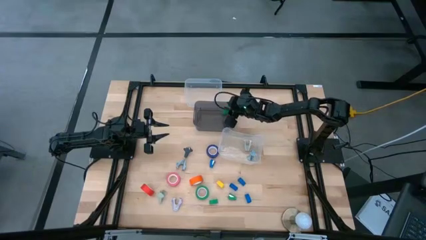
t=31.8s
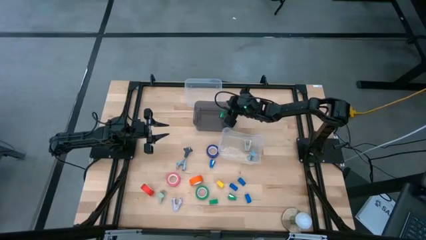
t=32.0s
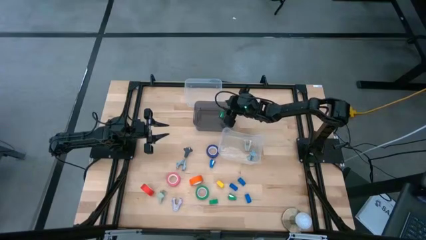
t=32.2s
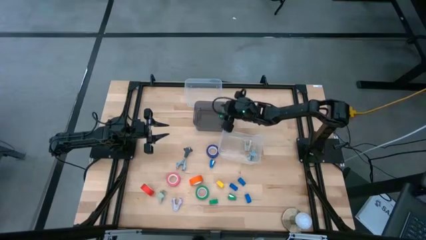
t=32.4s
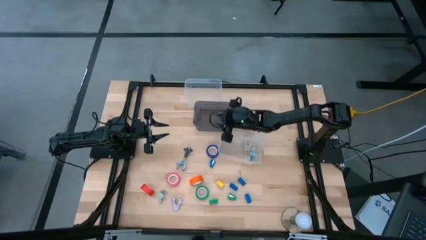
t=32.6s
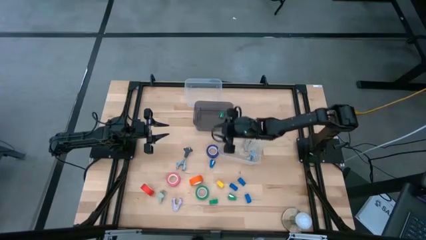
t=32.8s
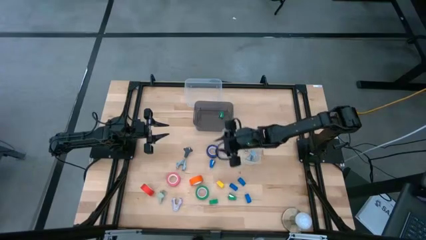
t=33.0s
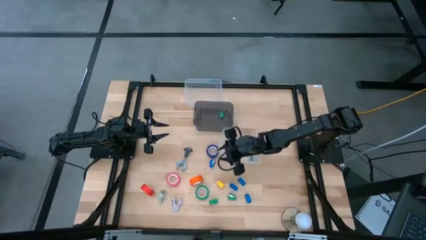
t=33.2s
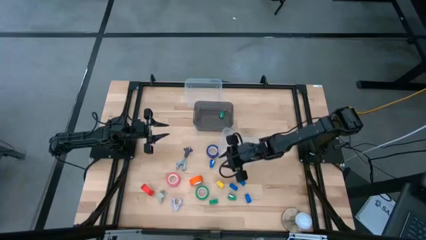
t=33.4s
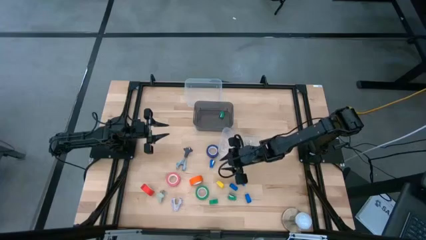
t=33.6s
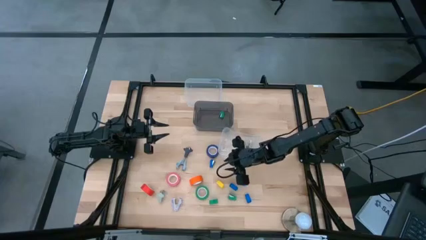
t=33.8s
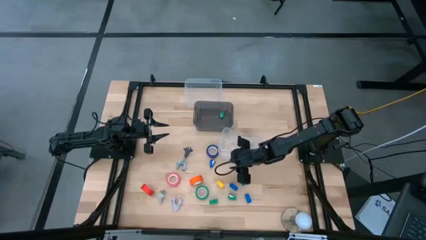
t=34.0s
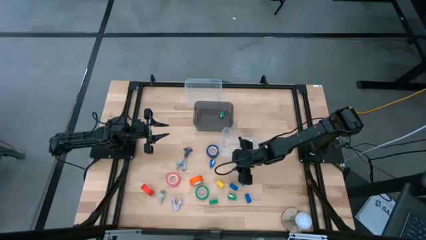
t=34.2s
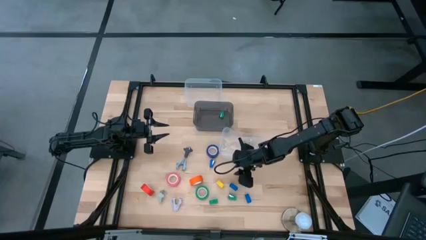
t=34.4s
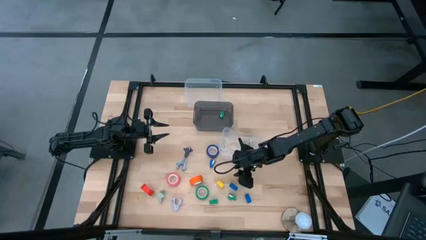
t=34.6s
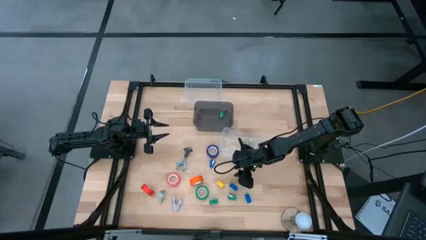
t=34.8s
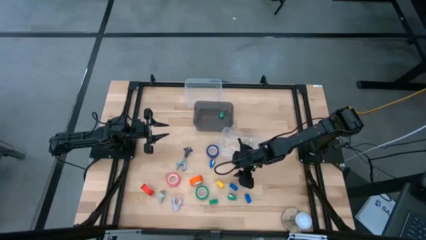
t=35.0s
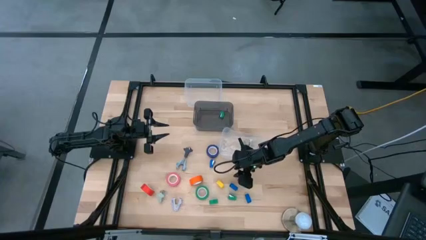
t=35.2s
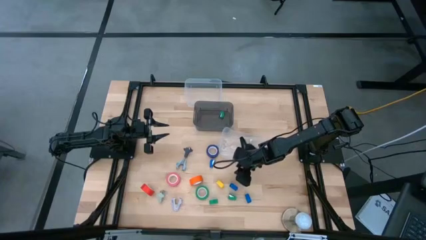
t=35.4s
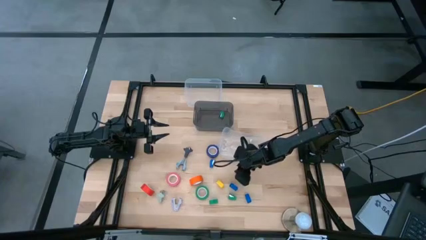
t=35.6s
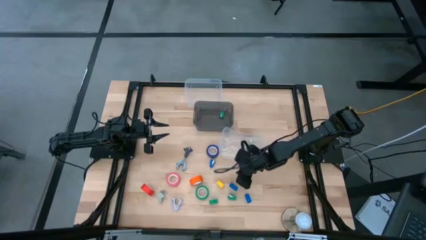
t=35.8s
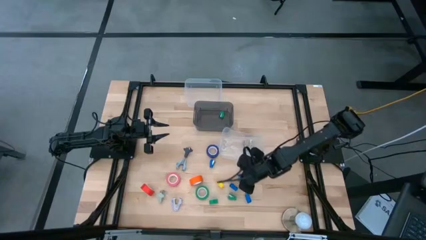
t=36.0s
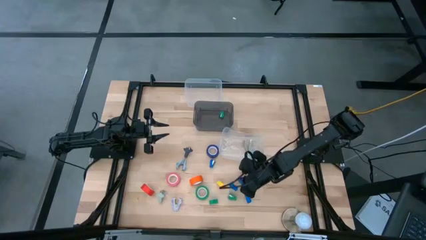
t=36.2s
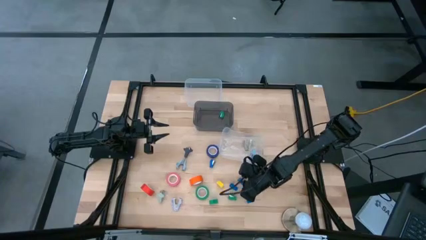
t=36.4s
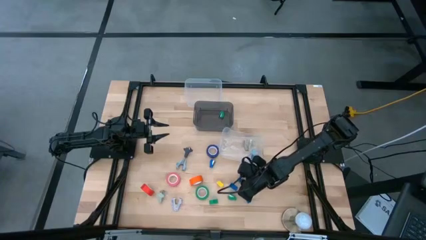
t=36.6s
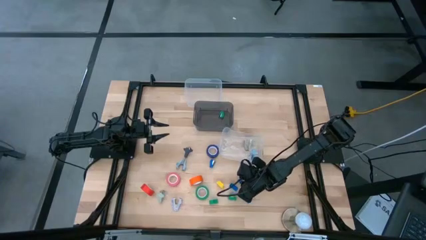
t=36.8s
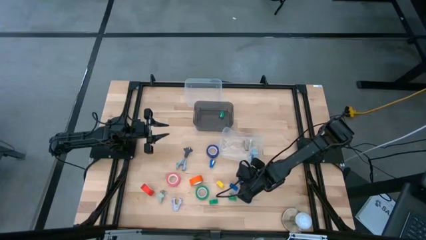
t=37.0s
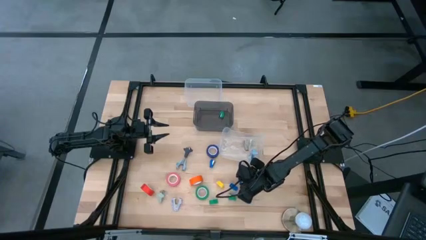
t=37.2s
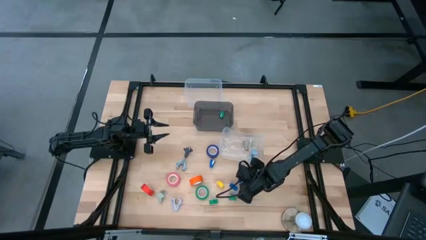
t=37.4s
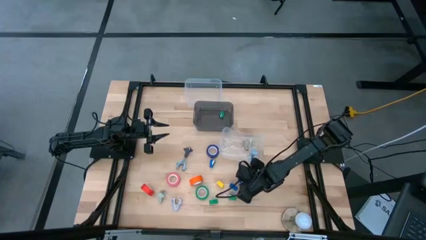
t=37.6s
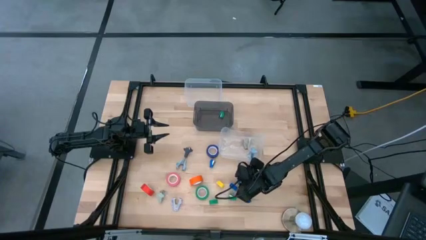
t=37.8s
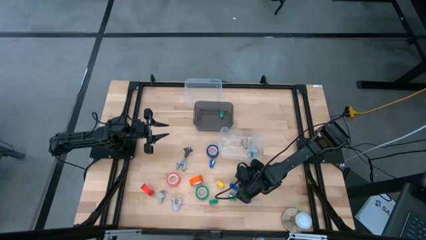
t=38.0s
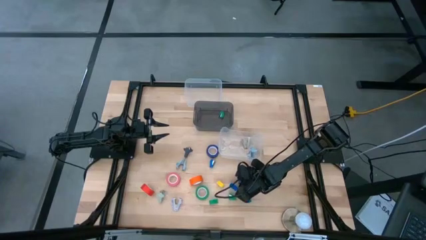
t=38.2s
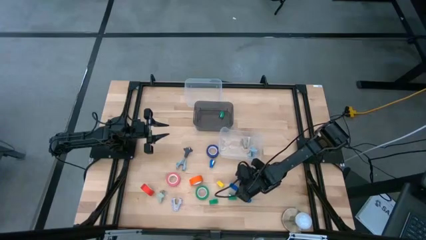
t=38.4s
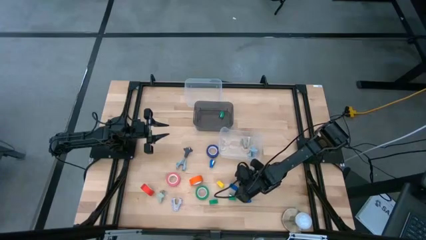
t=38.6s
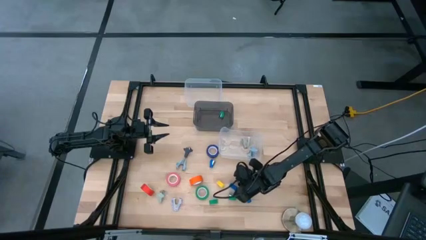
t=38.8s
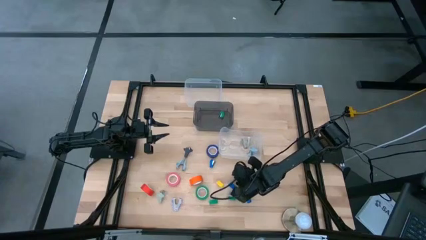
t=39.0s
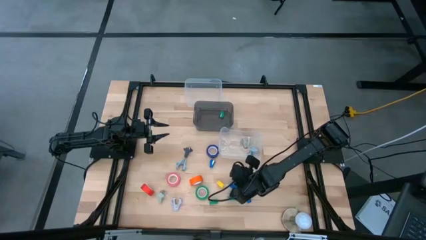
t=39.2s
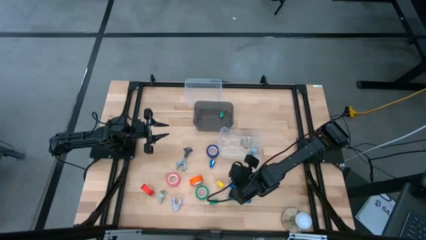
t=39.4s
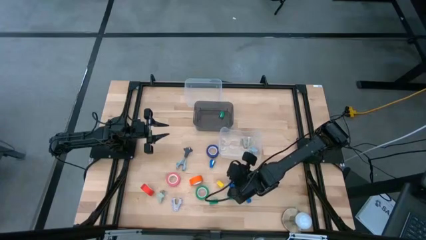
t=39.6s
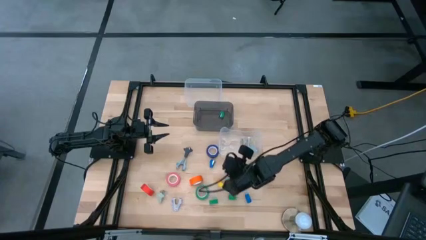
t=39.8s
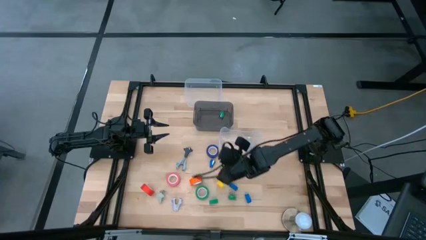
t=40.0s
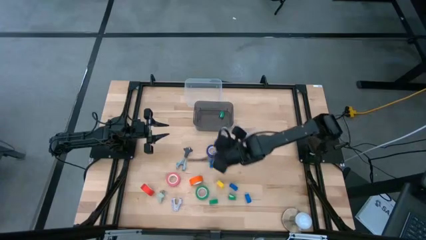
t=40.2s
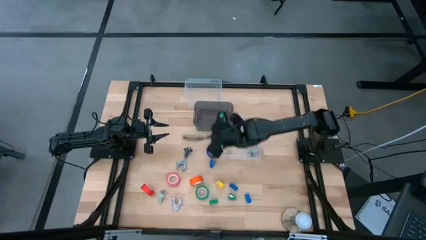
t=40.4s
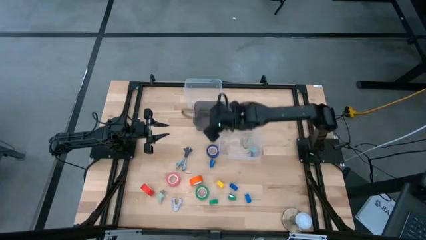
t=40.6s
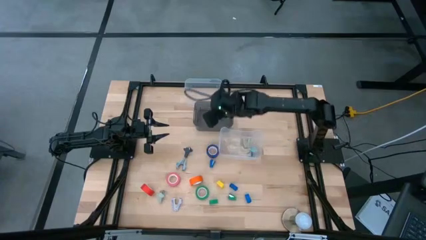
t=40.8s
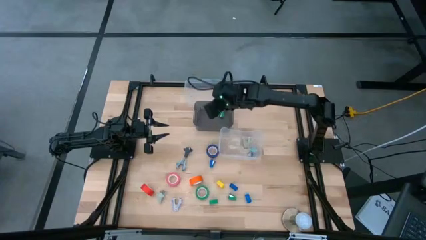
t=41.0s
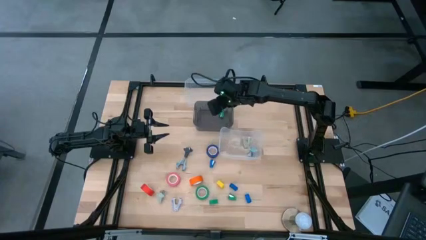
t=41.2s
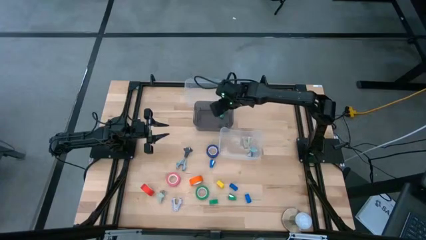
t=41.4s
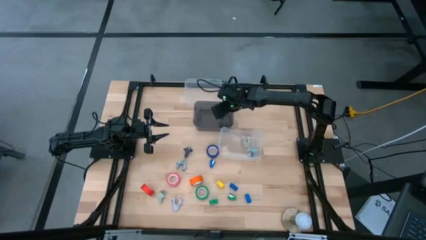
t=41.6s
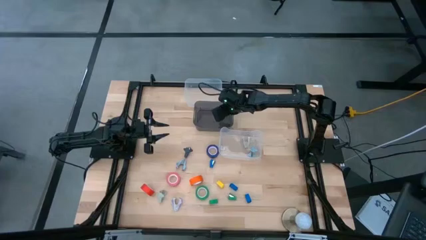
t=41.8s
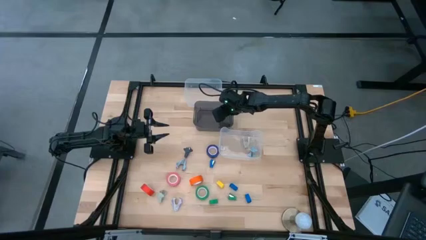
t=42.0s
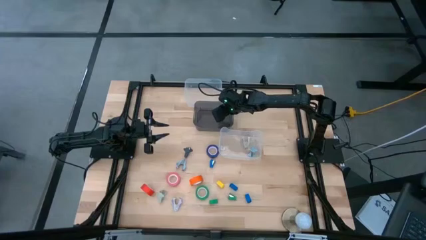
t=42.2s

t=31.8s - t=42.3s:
Task: Pick and place Stapler, Stapler remover, tape
Put the blue stapler into the black bin

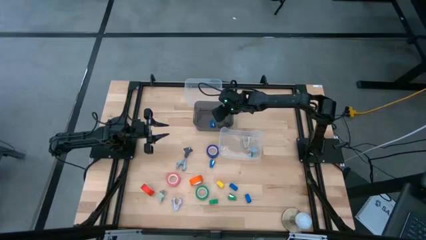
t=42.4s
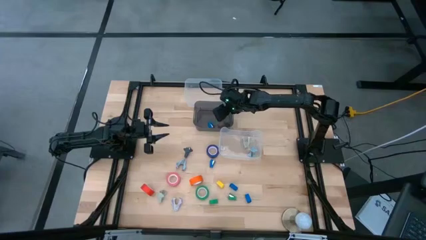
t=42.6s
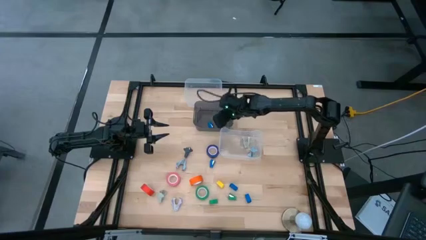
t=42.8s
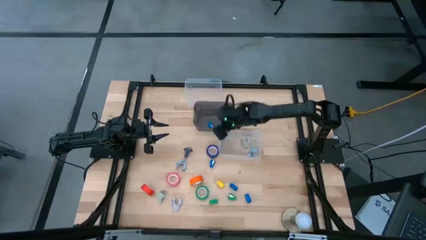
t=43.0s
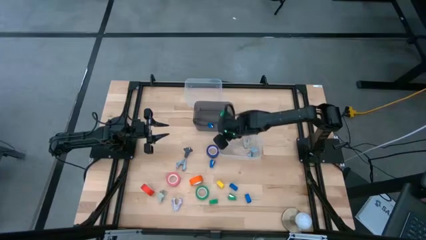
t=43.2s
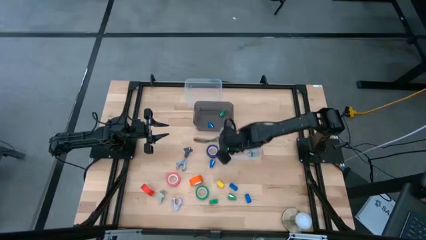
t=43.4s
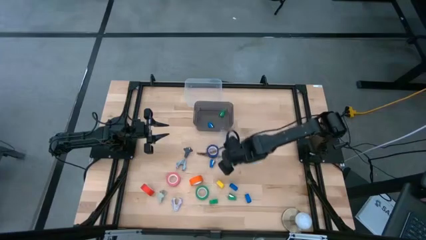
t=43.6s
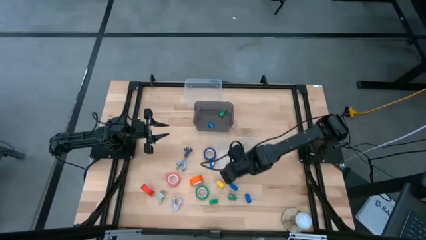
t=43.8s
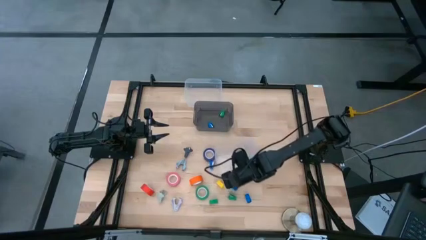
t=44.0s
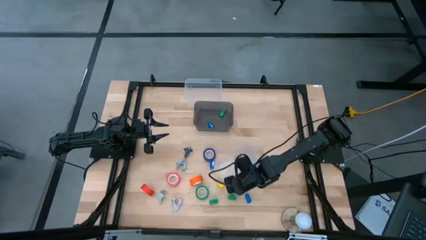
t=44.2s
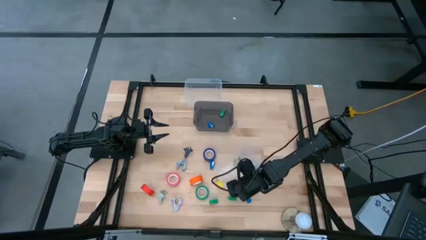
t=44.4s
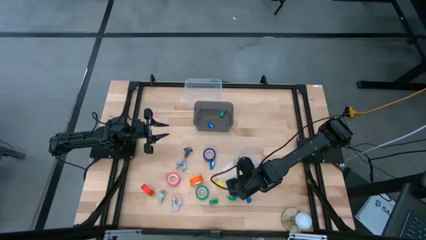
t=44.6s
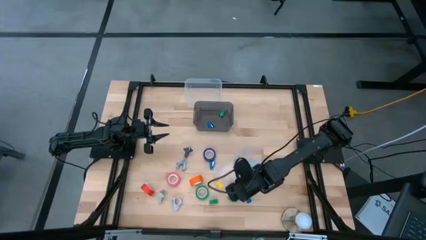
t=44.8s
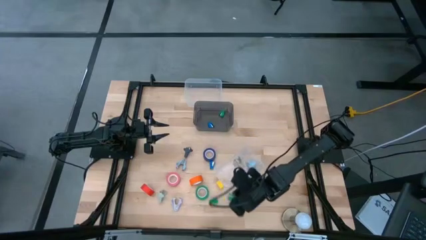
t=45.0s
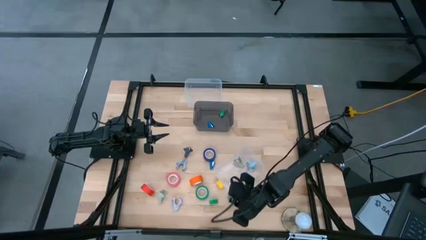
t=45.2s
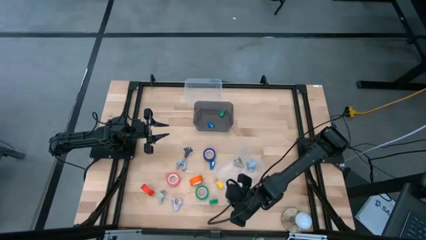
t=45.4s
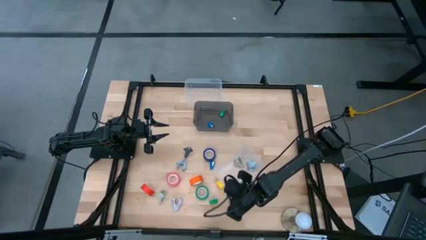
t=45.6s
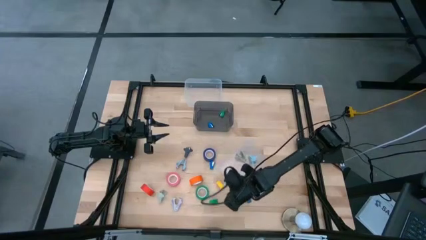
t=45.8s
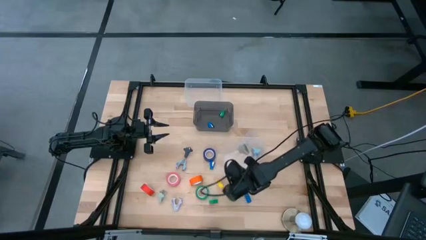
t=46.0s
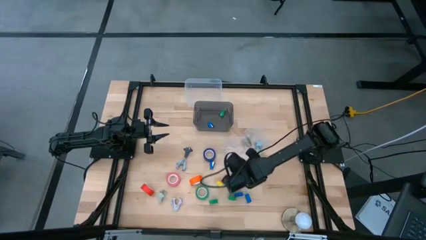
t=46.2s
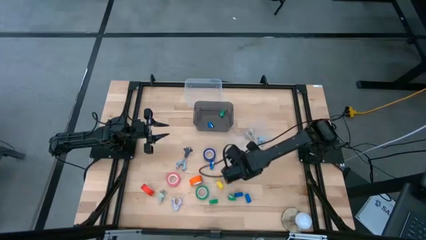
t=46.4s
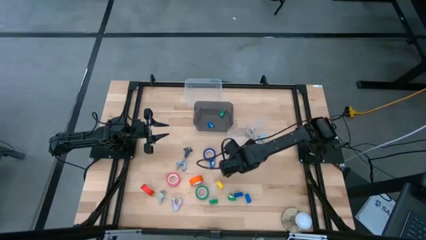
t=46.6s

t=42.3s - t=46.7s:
Adjust the bottom transparent bin
